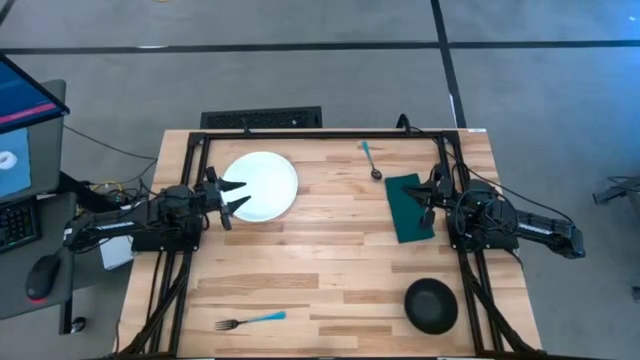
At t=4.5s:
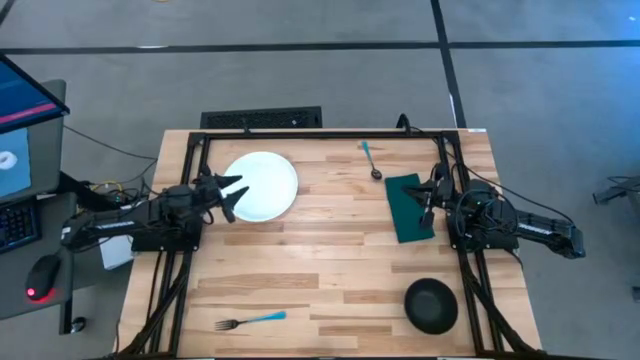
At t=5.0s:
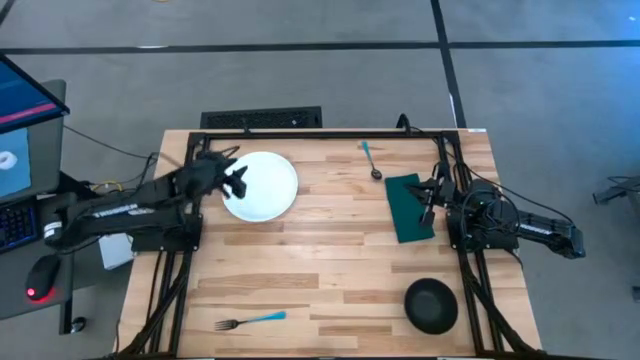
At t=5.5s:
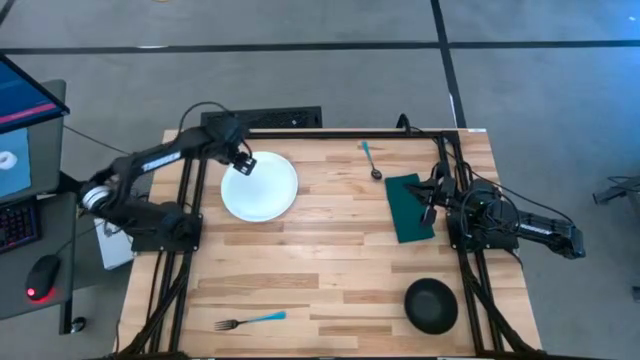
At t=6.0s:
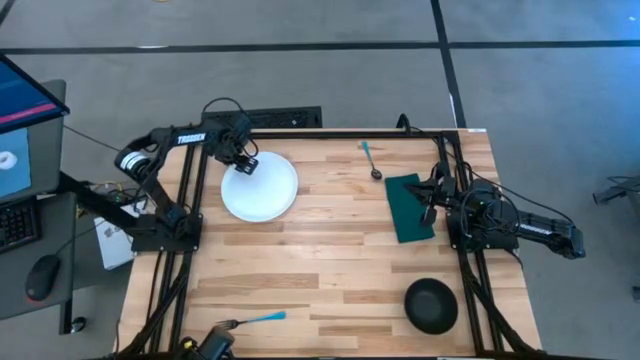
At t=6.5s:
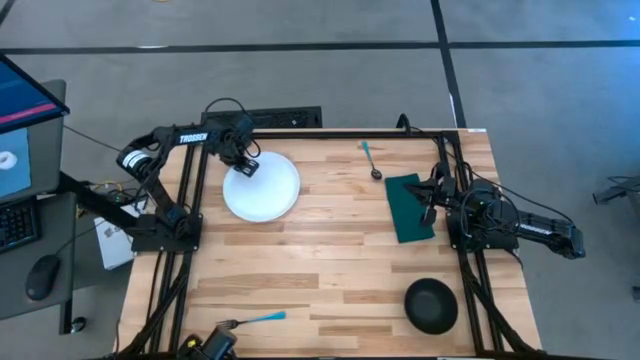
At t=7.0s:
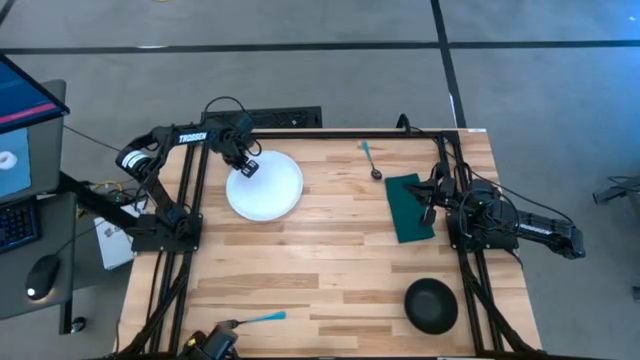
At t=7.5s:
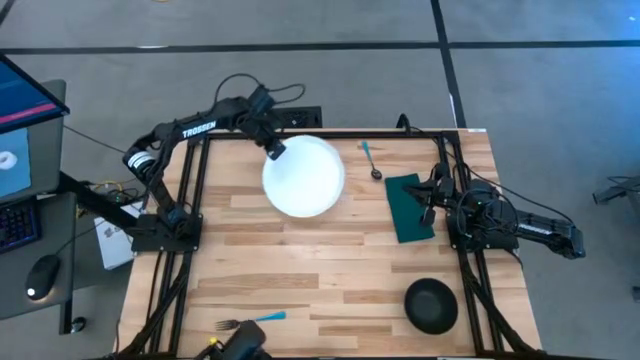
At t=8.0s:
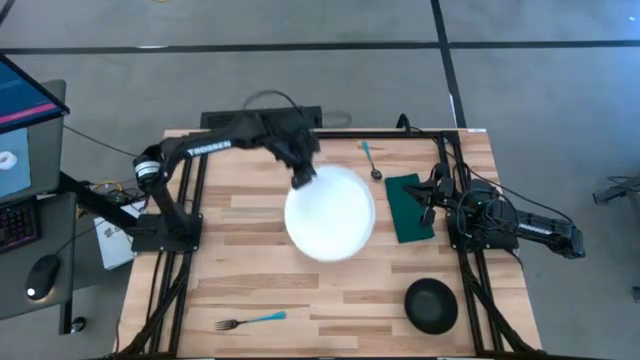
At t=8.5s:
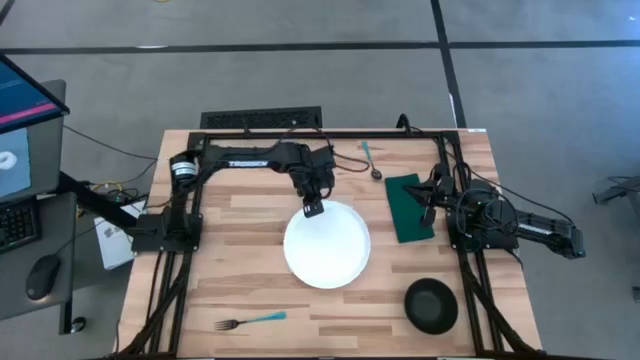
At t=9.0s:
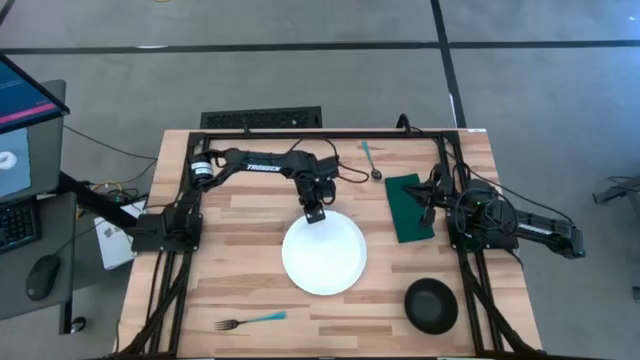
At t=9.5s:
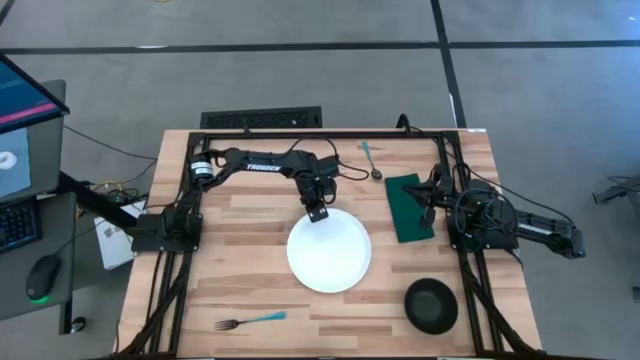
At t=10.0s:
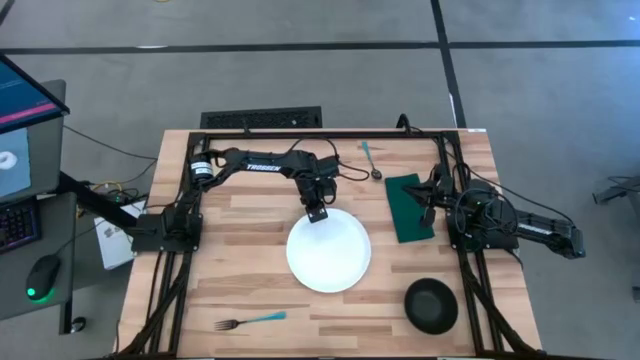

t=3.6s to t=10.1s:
Task: Set table place
Move the white plate to the center of the table

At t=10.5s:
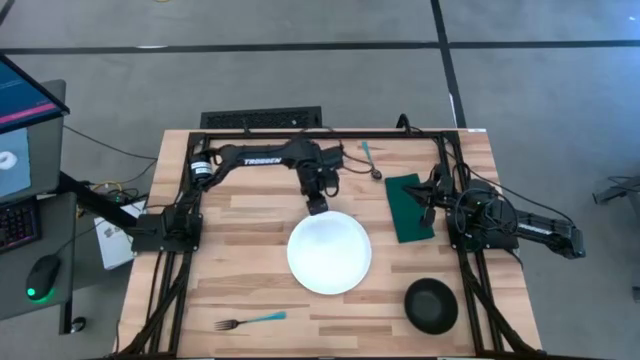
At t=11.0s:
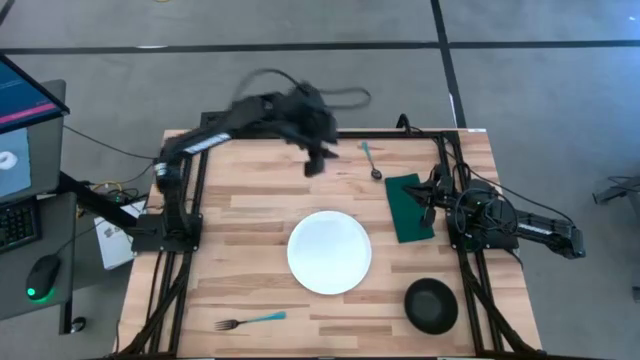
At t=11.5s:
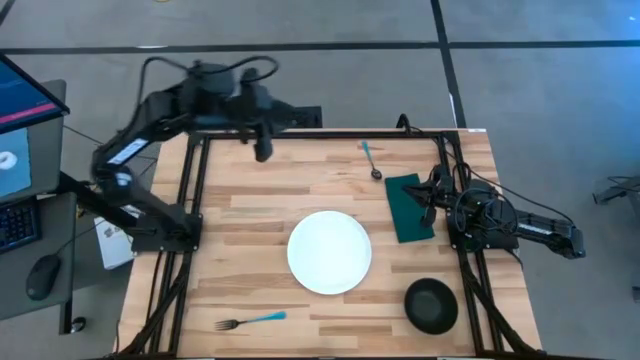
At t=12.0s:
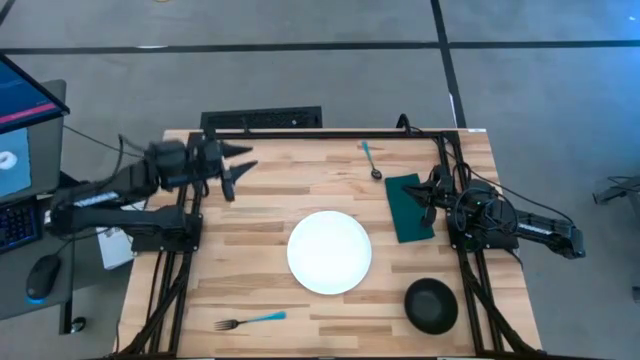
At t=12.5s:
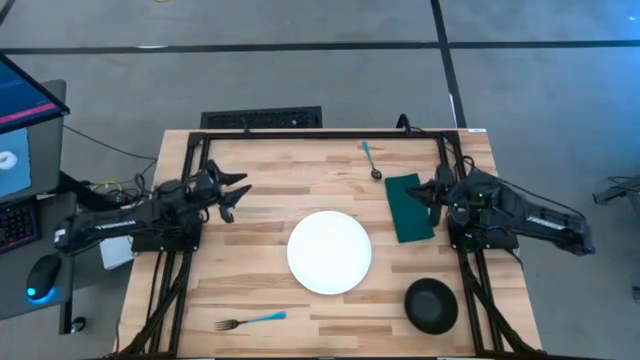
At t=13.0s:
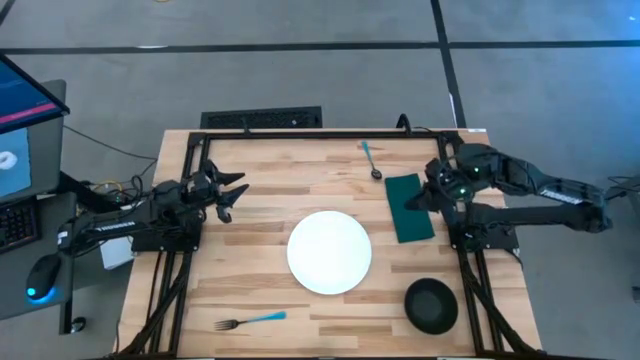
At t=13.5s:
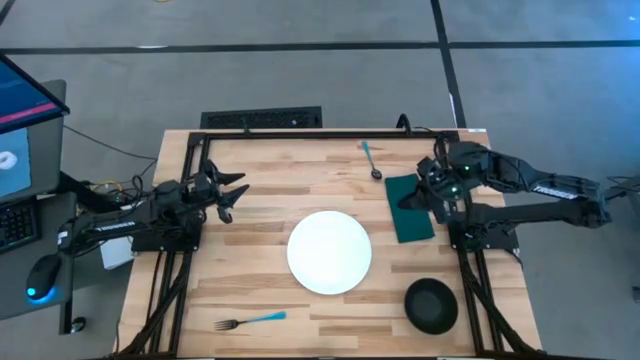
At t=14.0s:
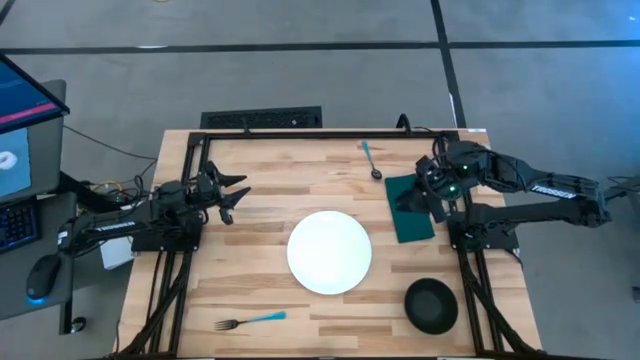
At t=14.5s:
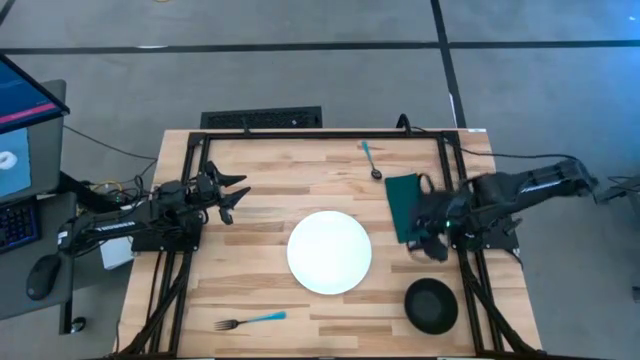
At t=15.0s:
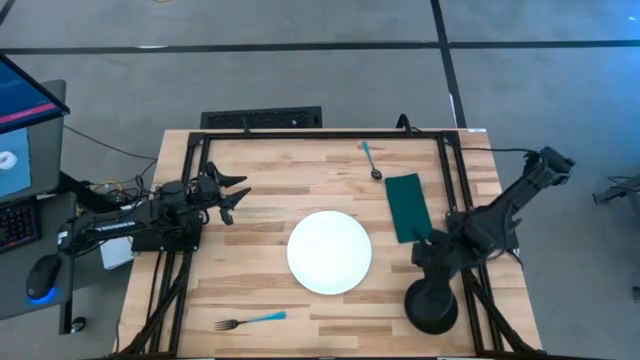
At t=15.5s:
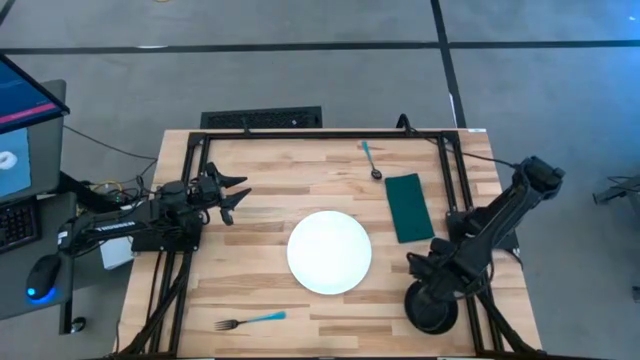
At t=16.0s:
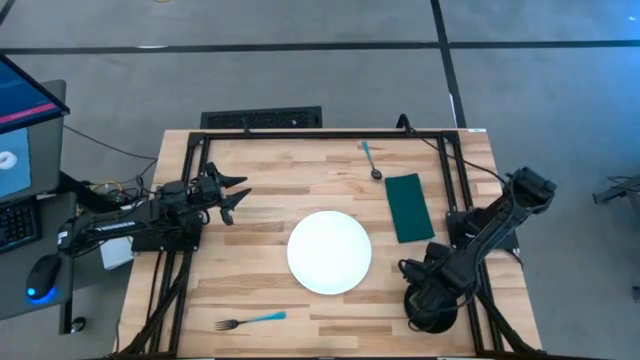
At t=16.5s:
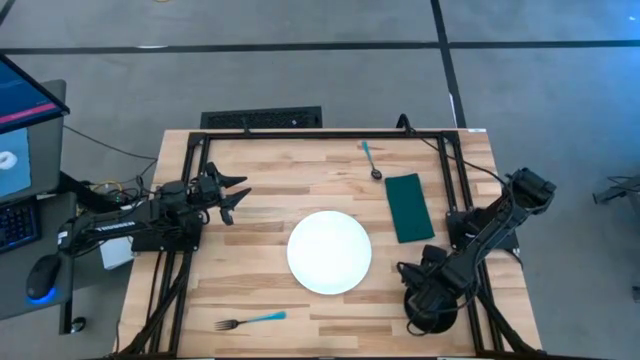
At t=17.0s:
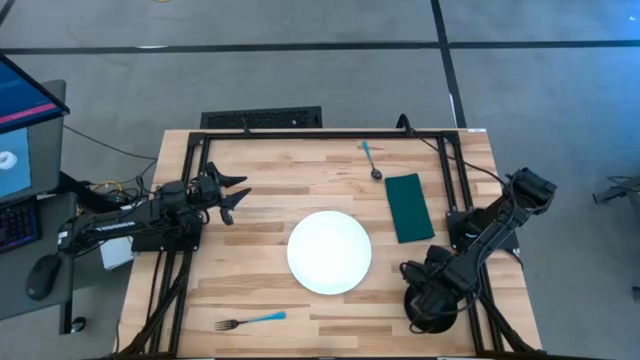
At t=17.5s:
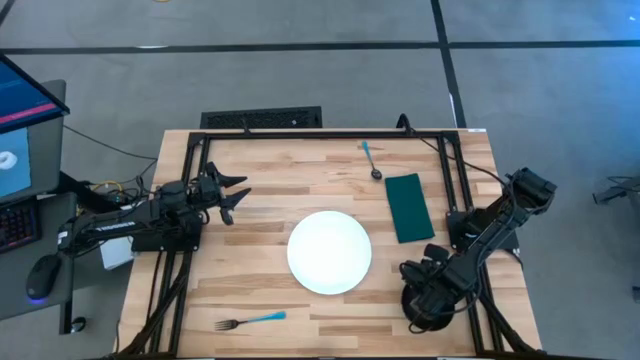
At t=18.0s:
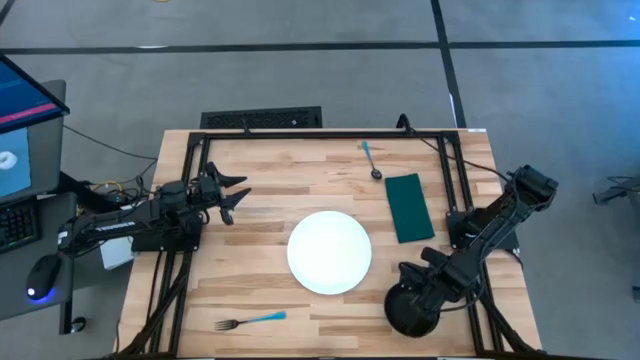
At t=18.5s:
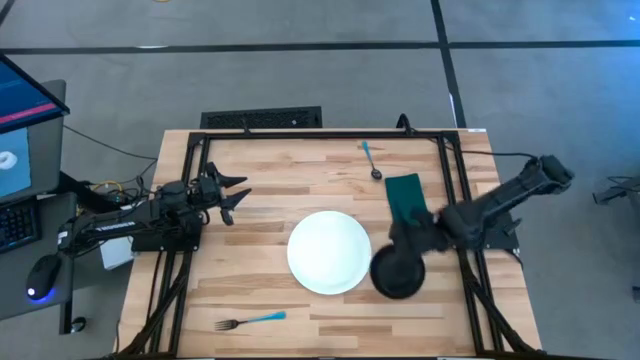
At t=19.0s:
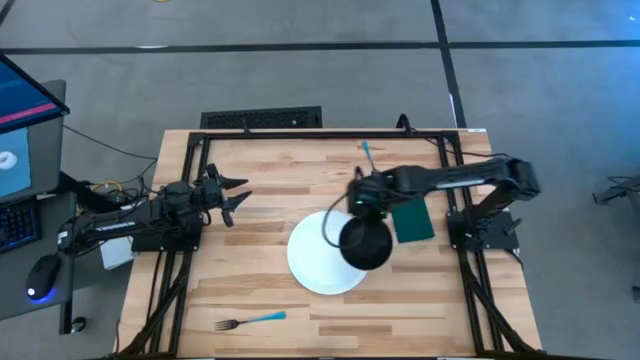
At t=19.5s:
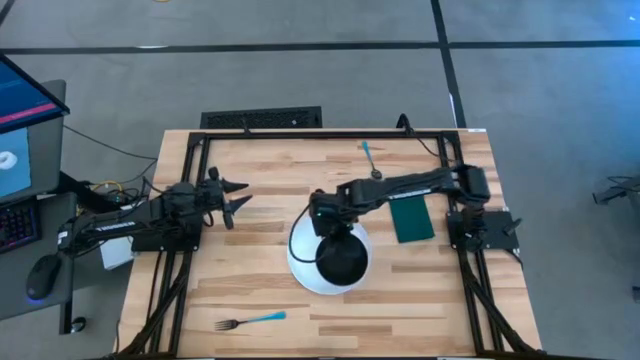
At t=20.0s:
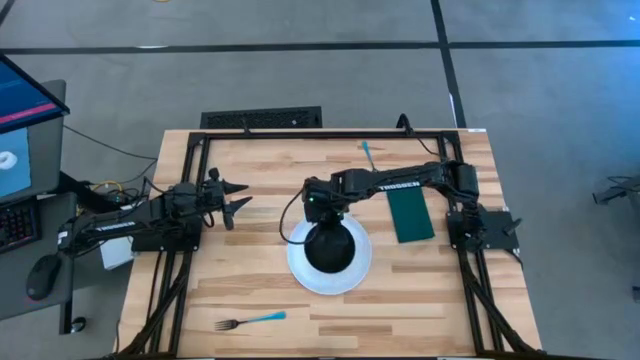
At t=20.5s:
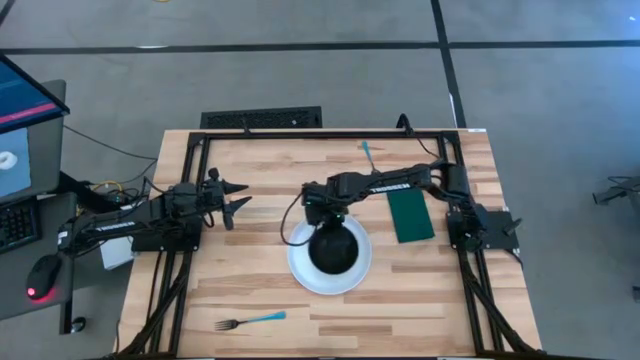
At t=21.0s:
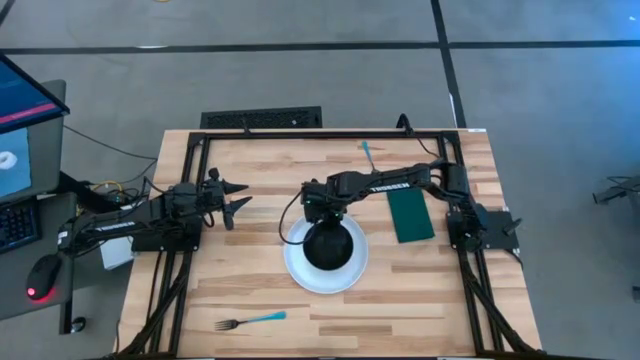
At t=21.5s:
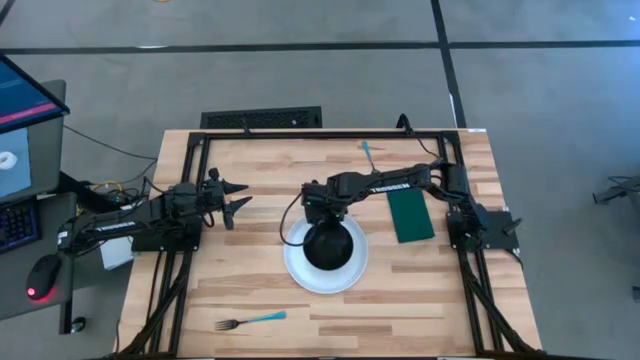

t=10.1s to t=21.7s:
Put the black bowl on the white plate

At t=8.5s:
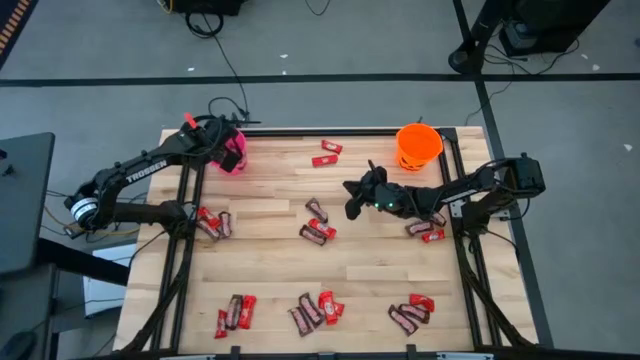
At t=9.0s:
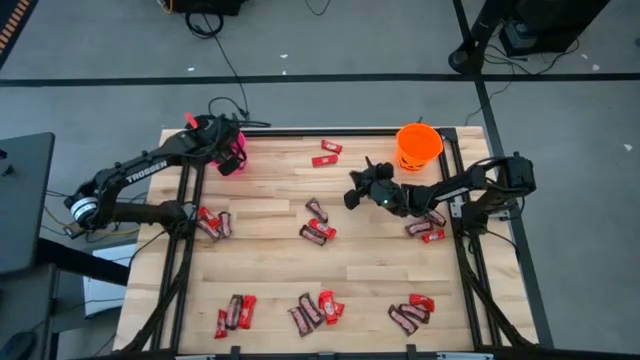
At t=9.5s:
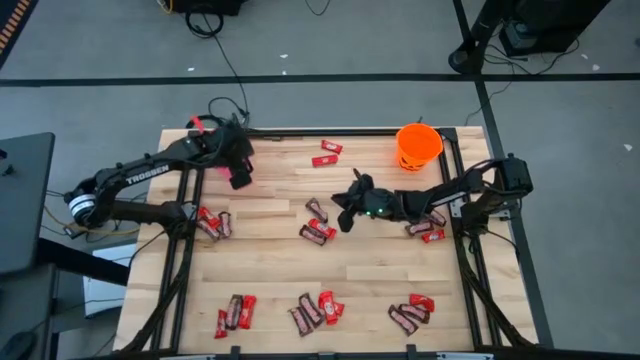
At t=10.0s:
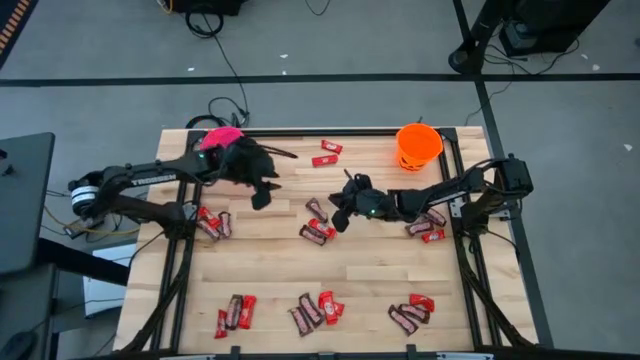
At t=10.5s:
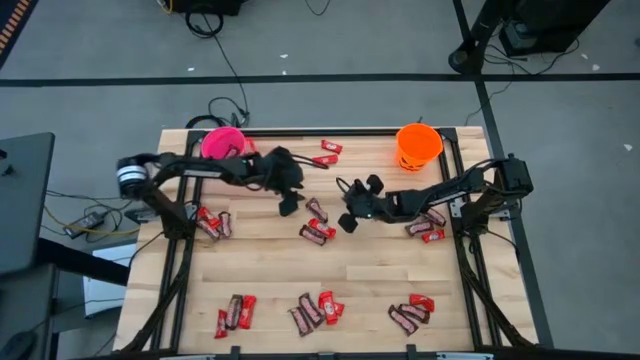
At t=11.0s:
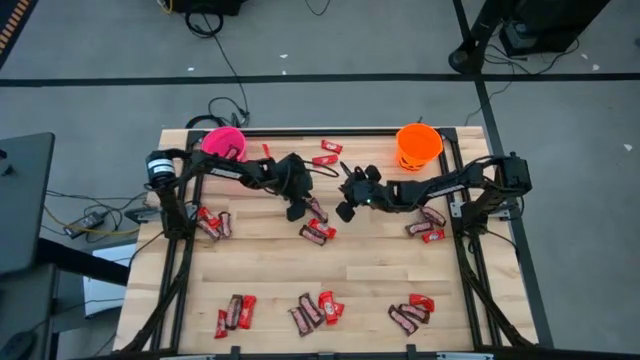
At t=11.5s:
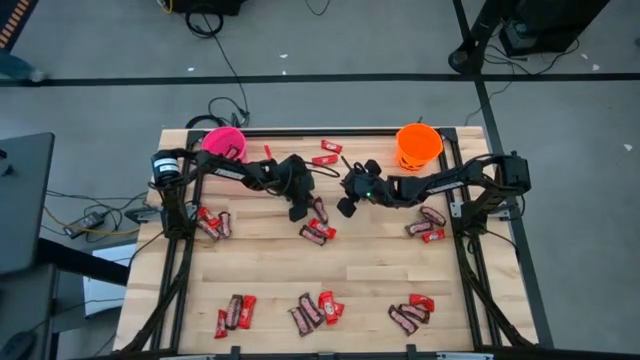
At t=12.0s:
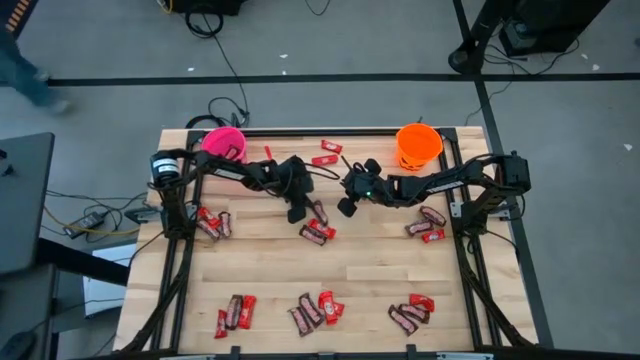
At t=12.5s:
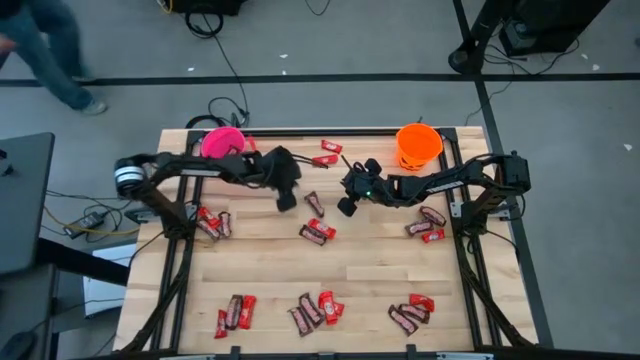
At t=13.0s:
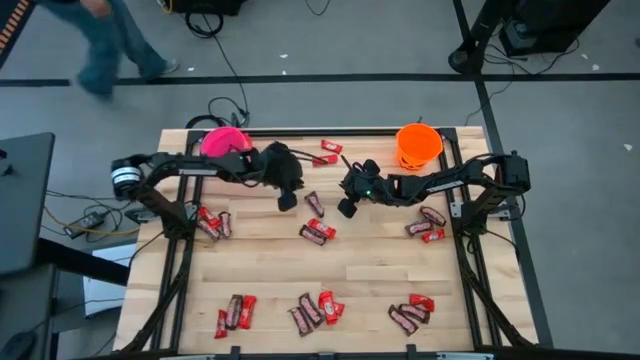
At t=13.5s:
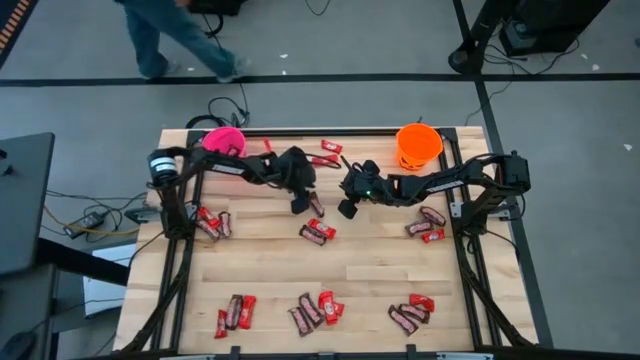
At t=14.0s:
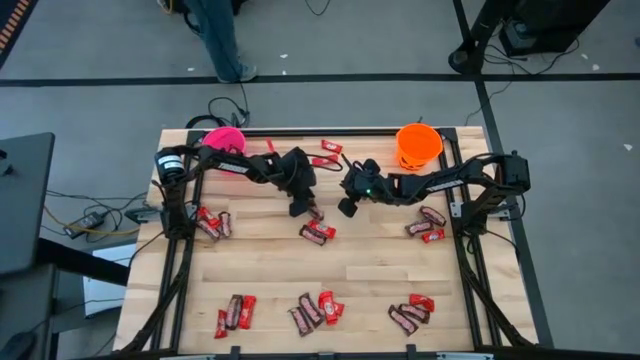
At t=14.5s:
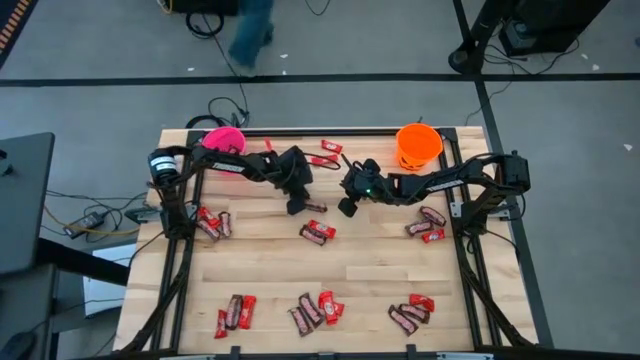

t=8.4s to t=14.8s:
Task: Sort candy by brand, put in halloween buckets
Put the brown chocolate bar into the pink bucket
